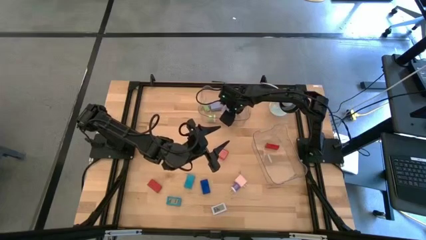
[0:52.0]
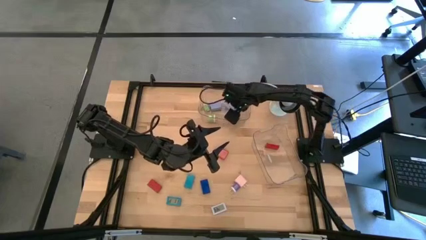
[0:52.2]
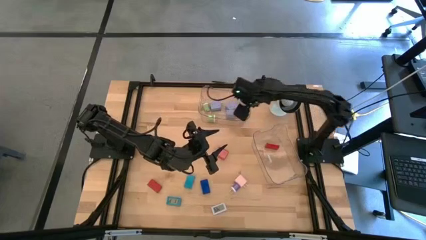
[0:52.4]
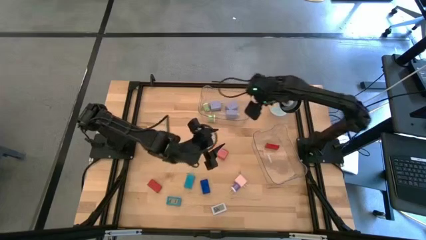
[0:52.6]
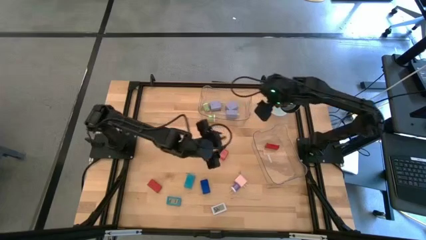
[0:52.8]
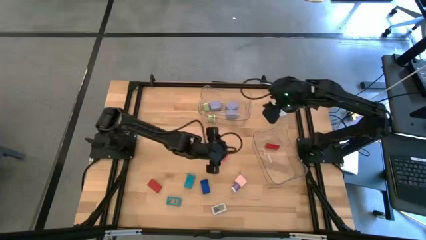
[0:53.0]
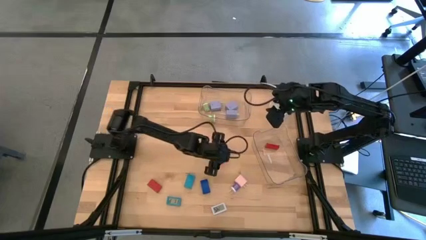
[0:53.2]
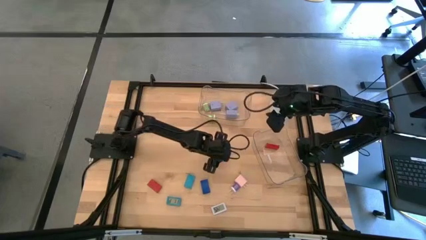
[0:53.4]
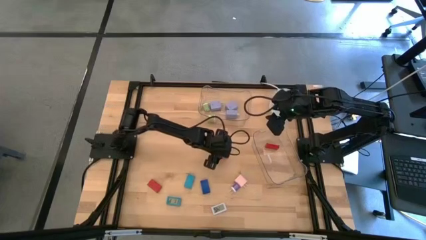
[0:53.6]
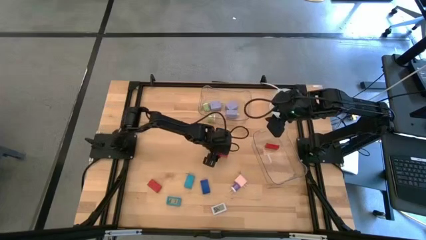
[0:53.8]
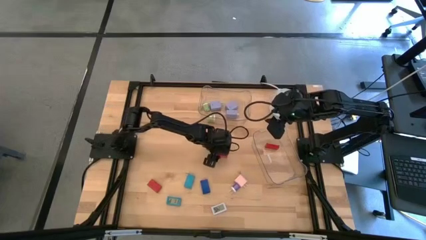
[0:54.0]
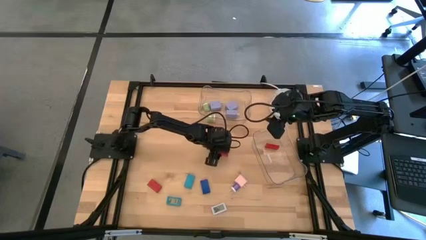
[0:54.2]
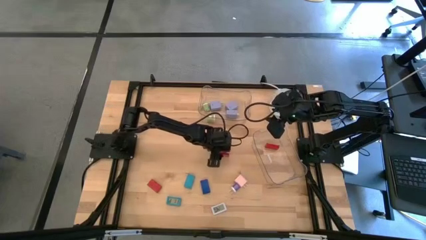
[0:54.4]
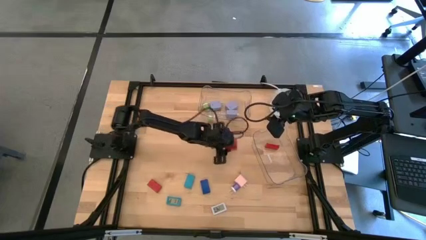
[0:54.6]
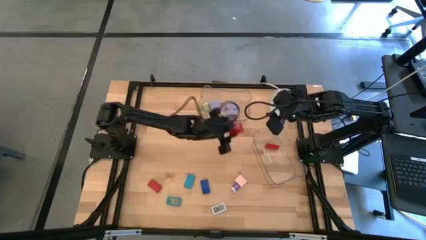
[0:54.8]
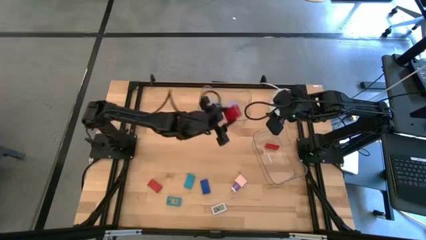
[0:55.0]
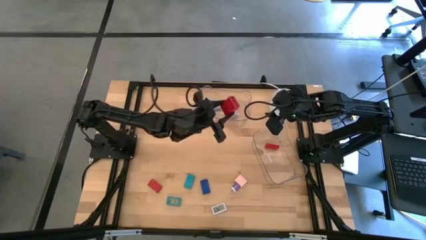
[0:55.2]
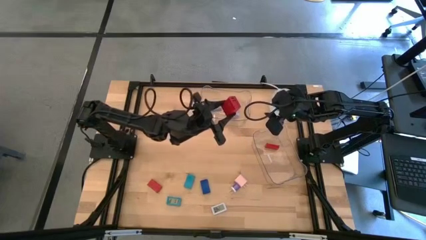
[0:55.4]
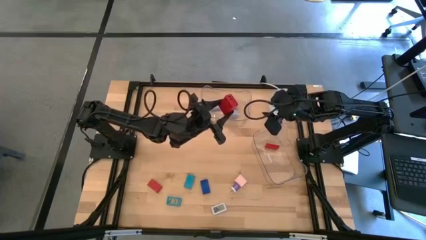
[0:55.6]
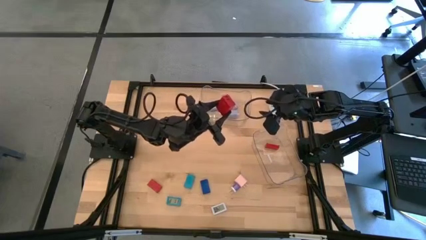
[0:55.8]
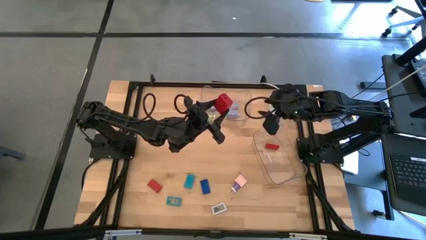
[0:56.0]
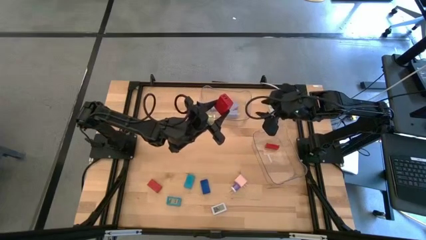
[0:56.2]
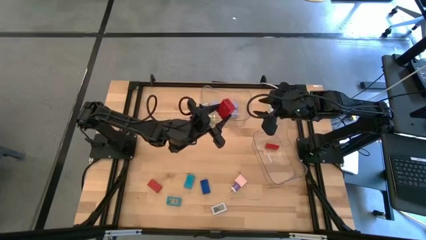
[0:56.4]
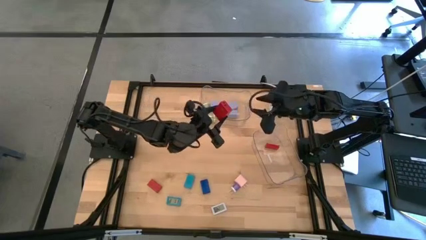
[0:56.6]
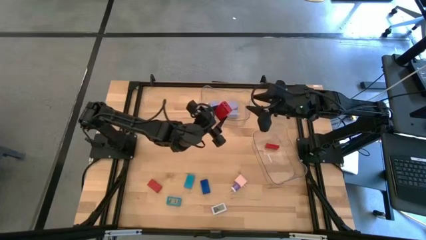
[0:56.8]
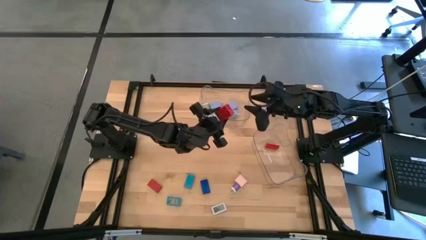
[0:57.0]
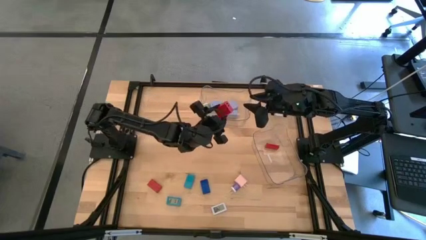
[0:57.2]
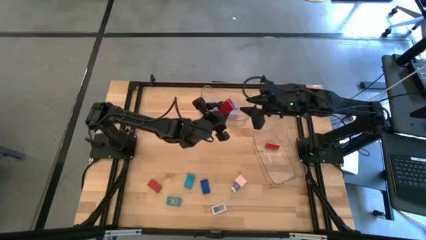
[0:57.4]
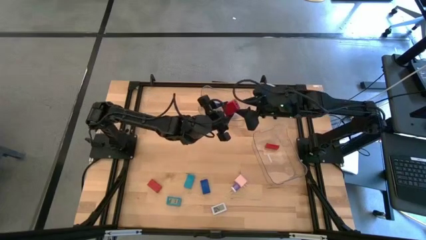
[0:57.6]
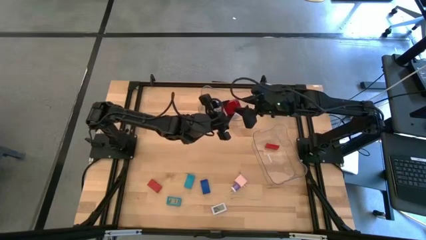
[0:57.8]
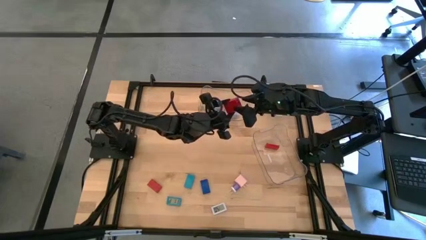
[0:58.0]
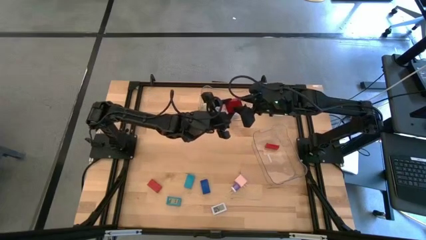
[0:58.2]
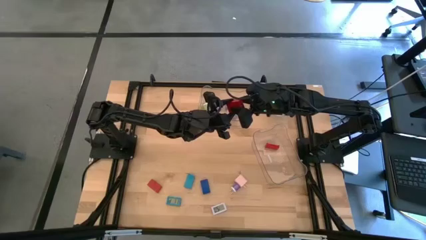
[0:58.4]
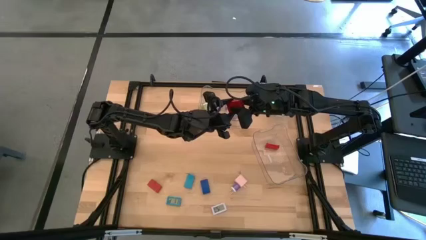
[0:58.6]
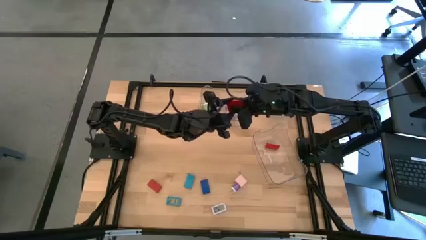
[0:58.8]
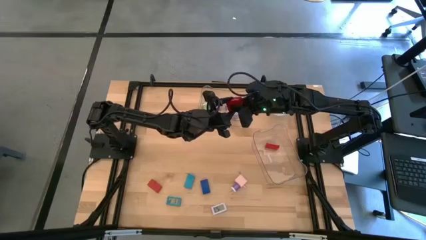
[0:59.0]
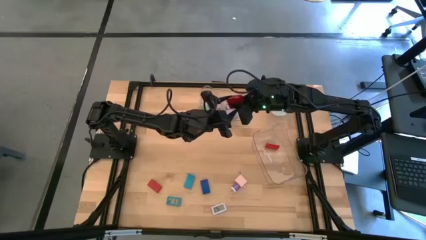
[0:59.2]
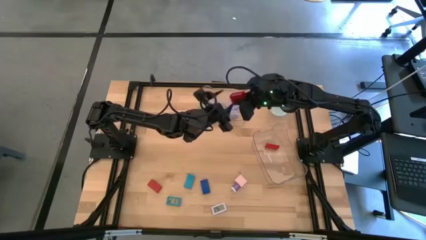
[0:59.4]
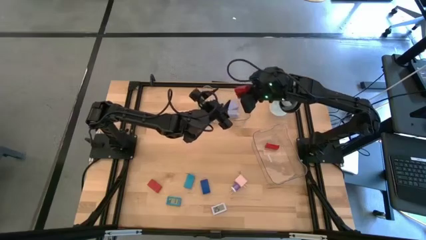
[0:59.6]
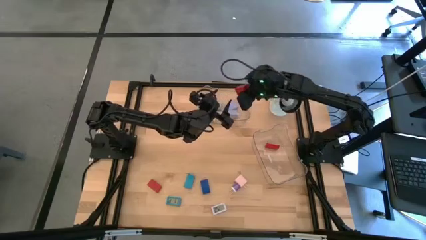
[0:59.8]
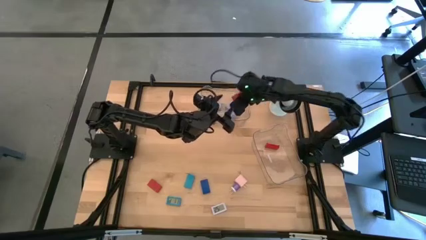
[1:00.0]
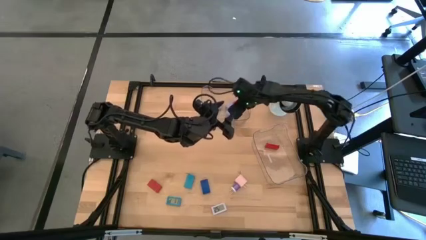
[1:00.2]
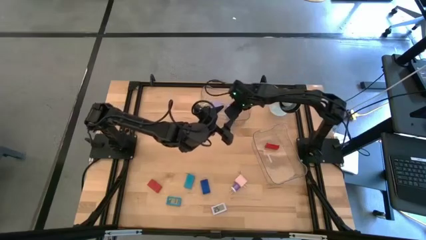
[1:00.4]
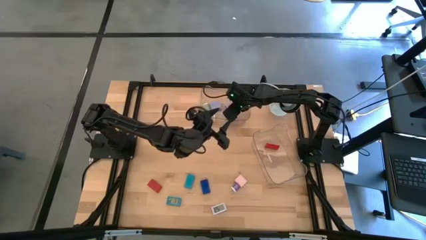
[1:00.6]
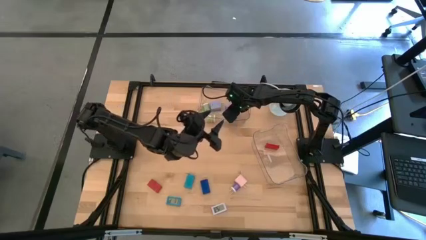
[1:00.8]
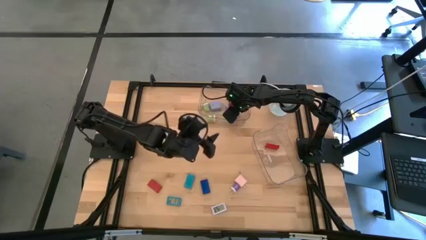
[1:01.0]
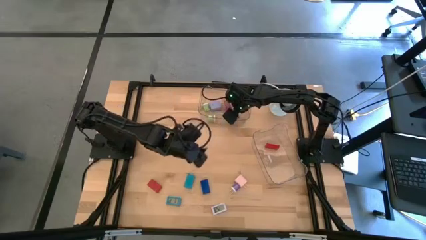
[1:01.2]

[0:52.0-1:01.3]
Task: Pick & Place Office items
Put the large red charger adapter into the top transparent bin

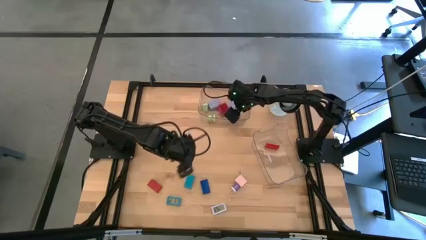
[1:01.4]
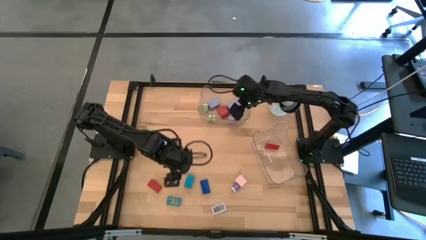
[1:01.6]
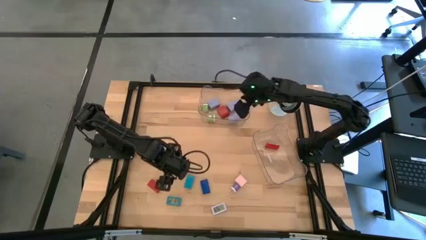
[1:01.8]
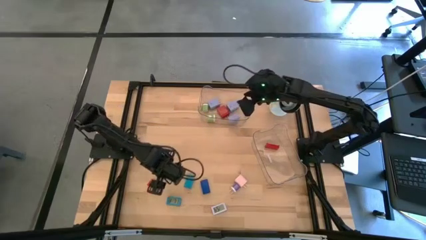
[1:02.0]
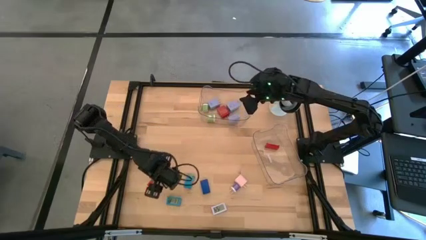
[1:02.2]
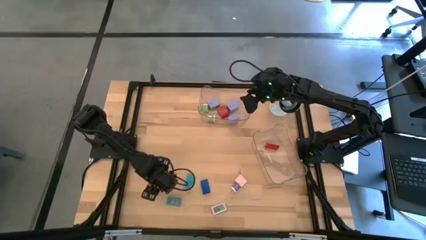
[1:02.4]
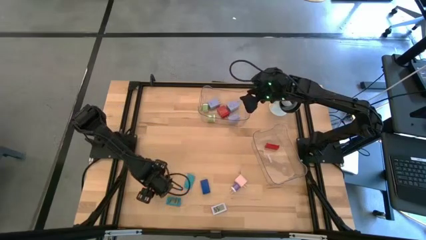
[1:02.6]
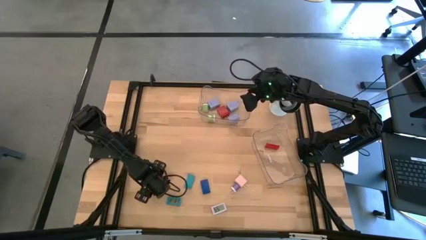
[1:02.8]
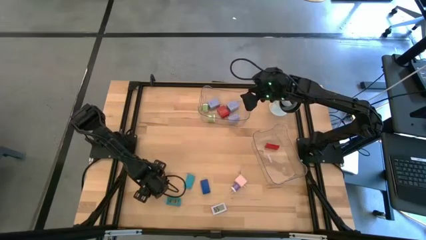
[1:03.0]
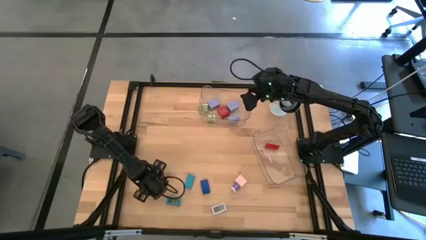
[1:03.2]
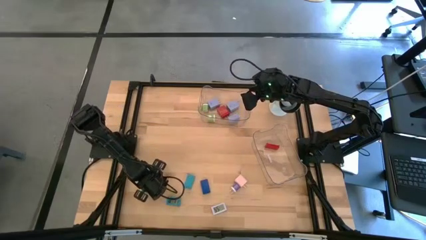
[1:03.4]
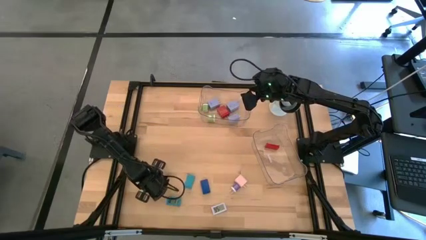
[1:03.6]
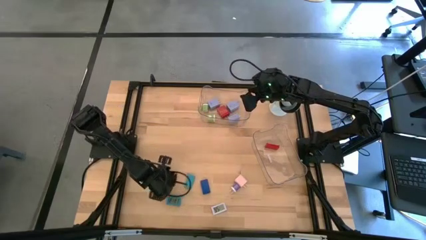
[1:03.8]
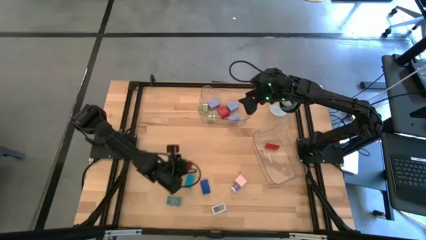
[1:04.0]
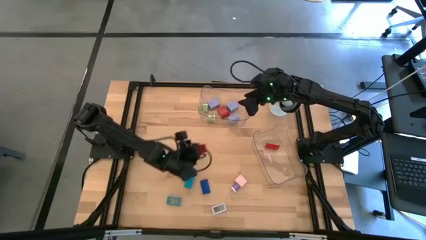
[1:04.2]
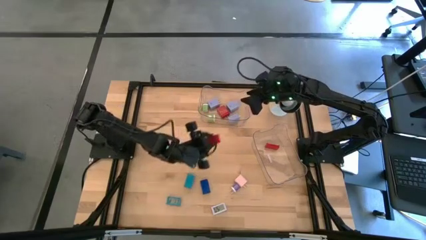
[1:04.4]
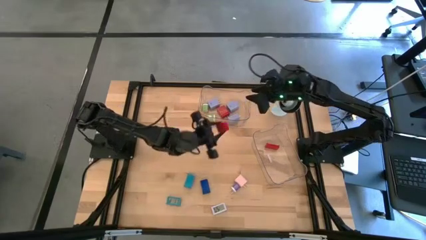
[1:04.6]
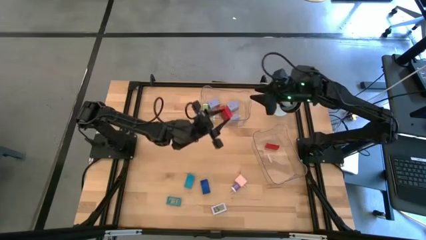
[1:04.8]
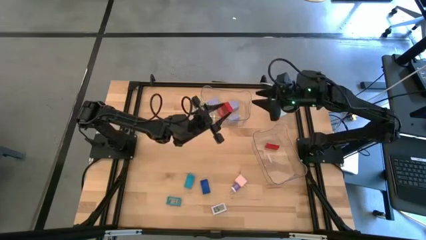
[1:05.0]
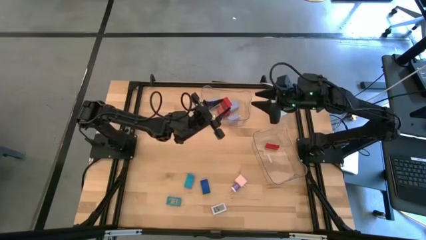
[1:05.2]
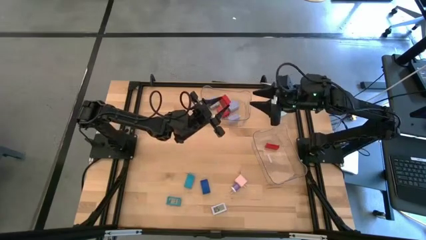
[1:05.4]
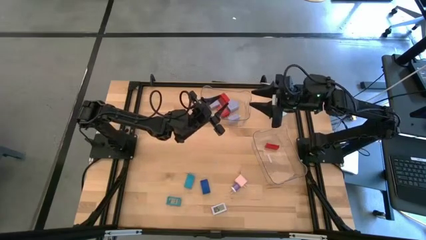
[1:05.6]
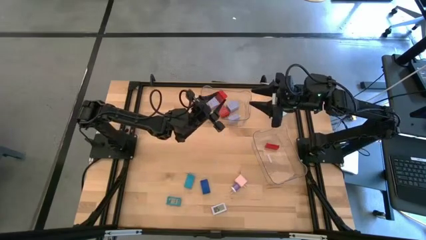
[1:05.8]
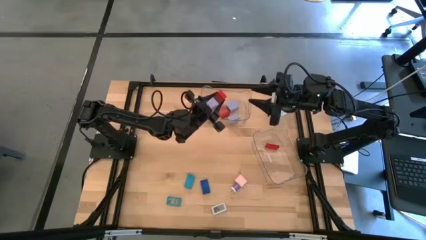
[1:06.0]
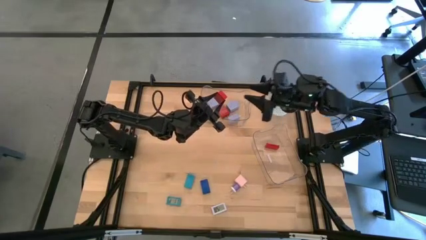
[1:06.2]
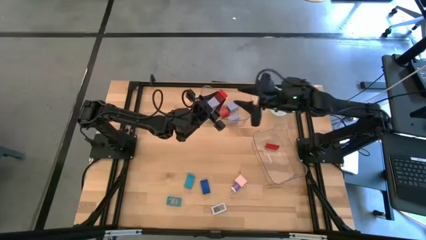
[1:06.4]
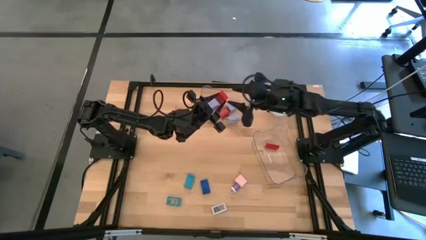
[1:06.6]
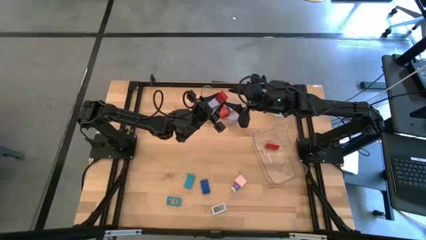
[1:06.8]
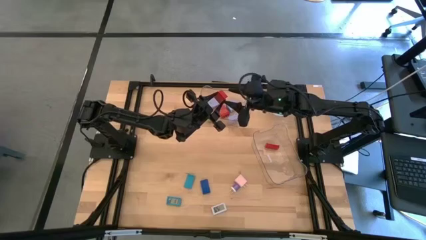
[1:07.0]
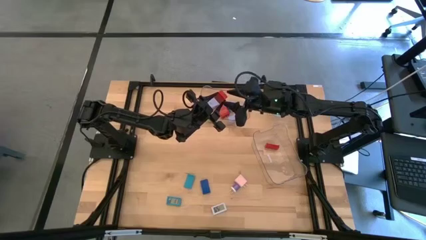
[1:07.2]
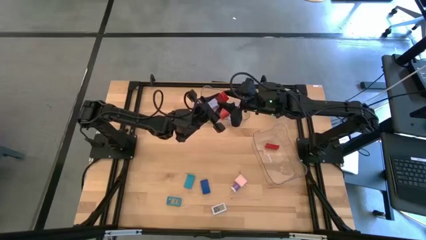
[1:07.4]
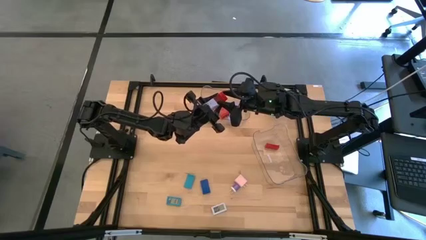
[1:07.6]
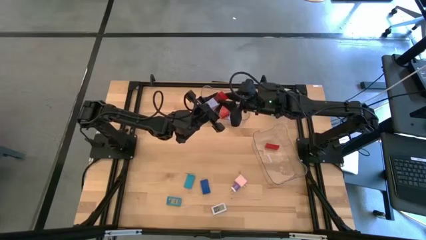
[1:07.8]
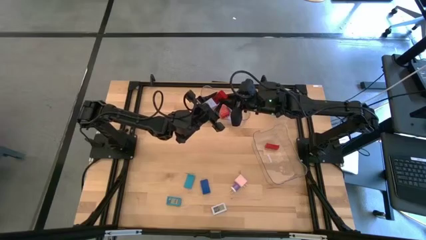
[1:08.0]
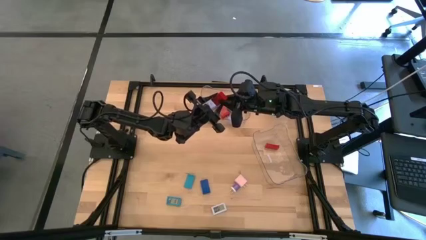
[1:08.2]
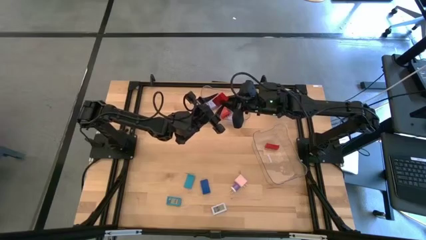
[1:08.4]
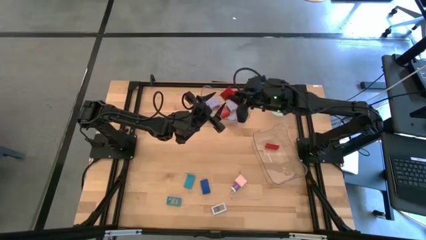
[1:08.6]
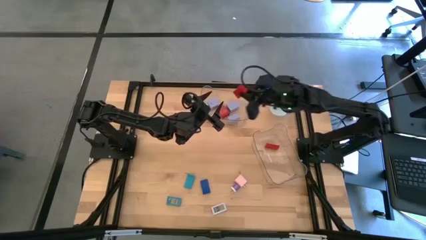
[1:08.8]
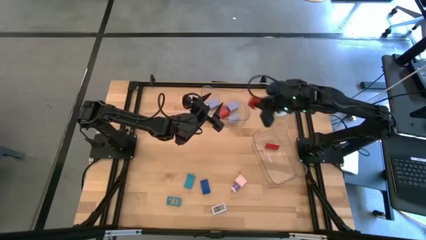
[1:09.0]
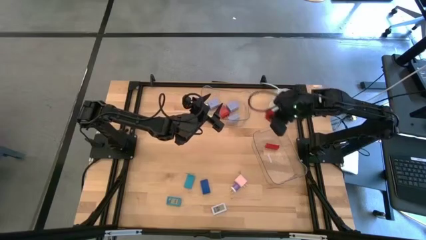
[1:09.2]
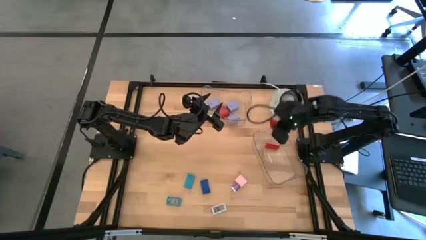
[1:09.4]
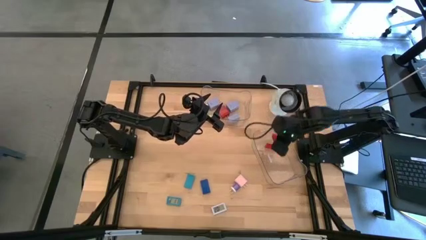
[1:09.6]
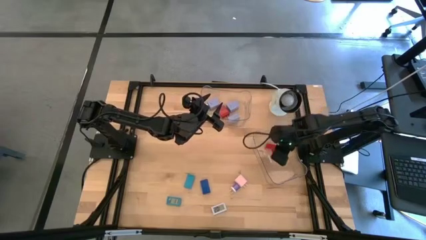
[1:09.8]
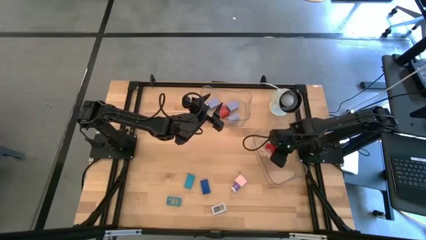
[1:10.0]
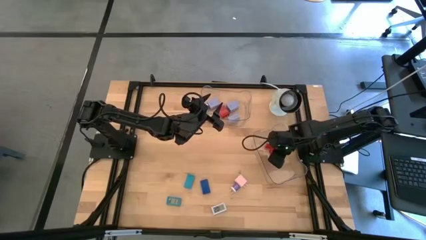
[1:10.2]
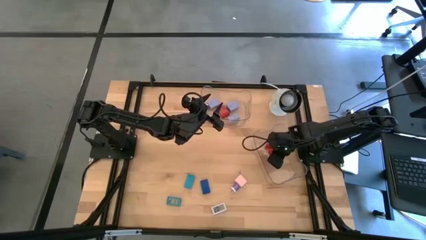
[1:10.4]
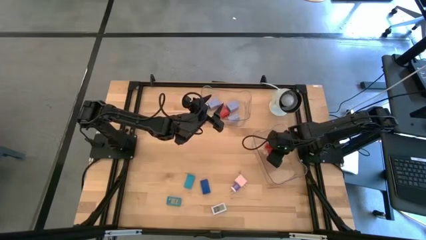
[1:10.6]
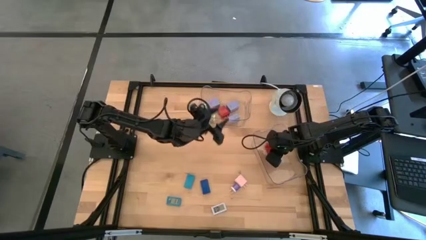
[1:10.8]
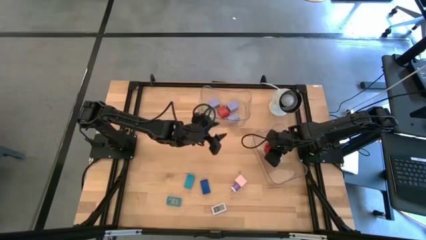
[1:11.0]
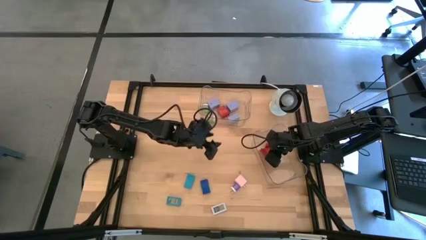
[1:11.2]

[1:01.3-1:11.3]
Put the red digital clock into the bottom transparent bin
